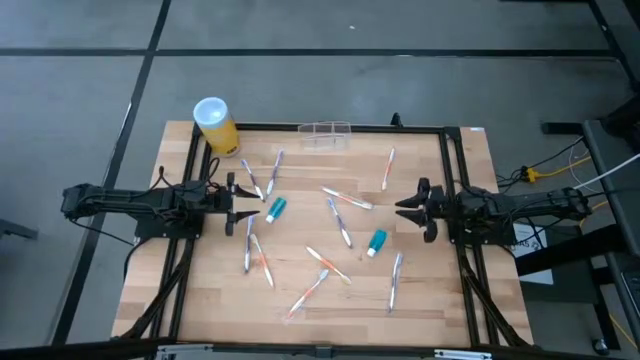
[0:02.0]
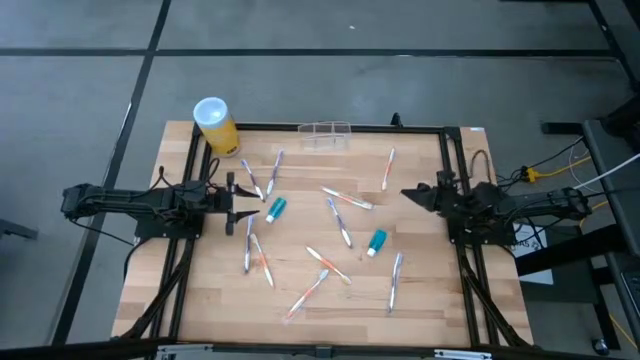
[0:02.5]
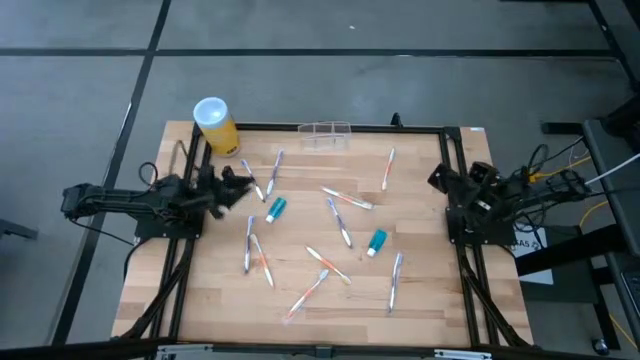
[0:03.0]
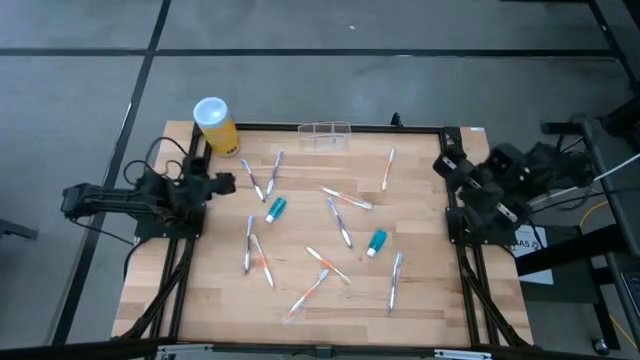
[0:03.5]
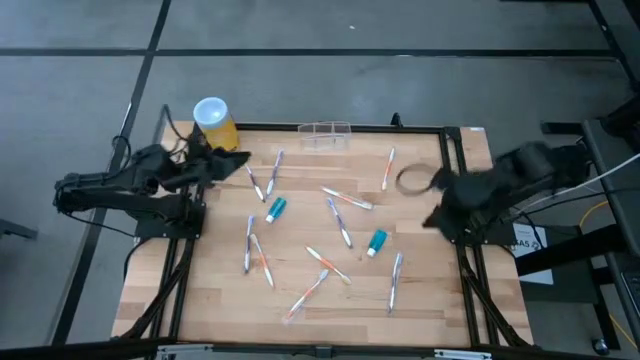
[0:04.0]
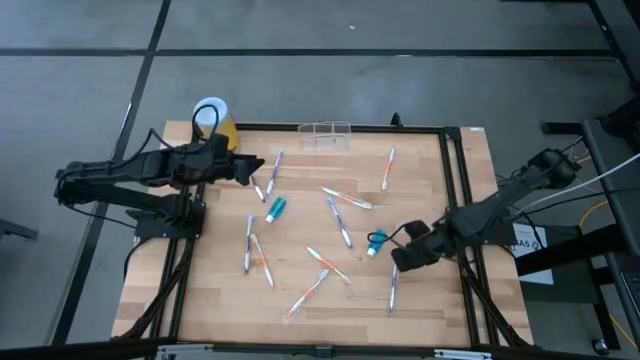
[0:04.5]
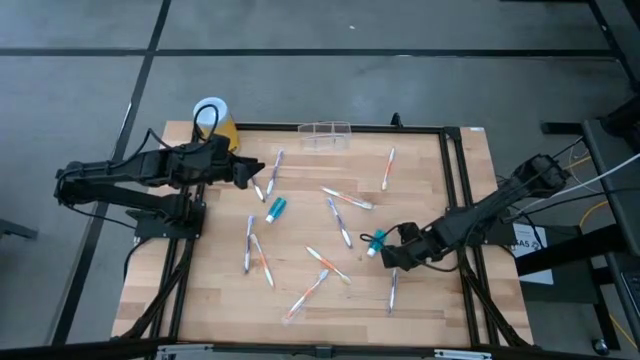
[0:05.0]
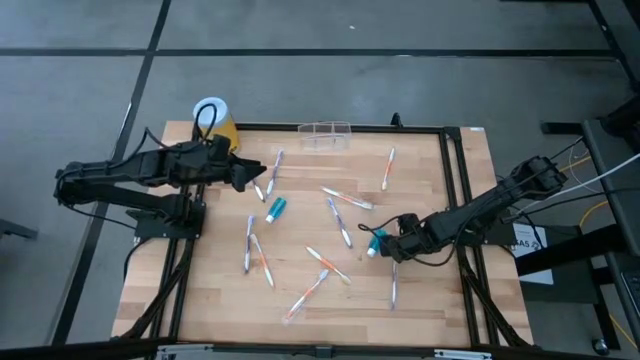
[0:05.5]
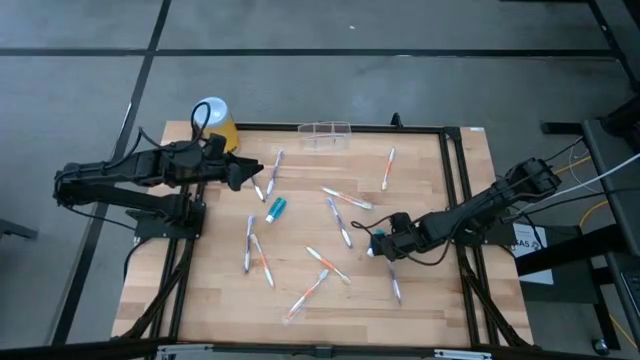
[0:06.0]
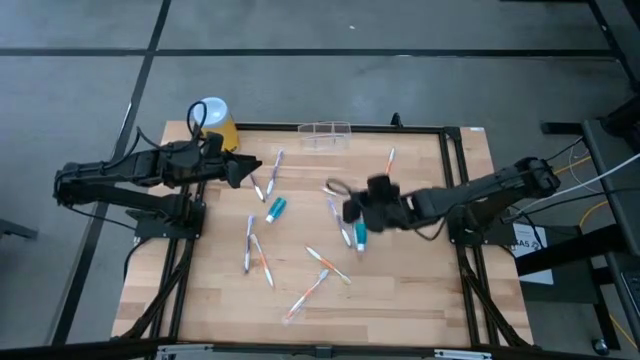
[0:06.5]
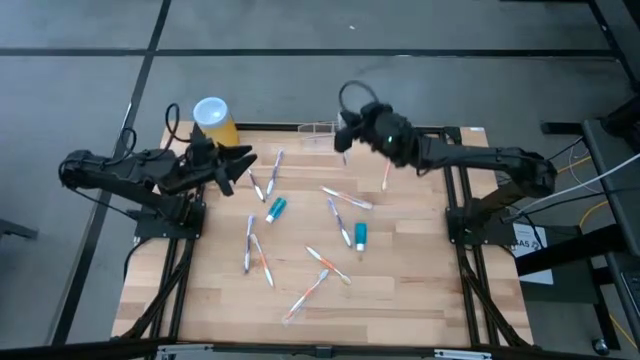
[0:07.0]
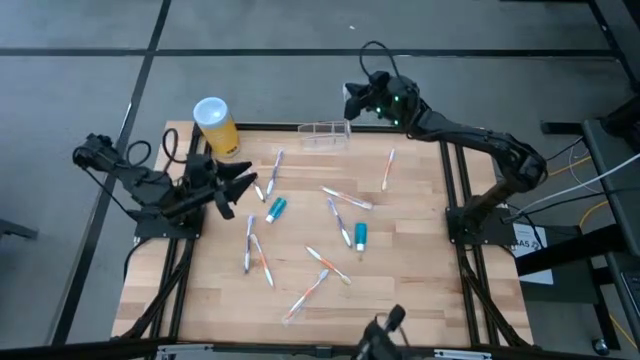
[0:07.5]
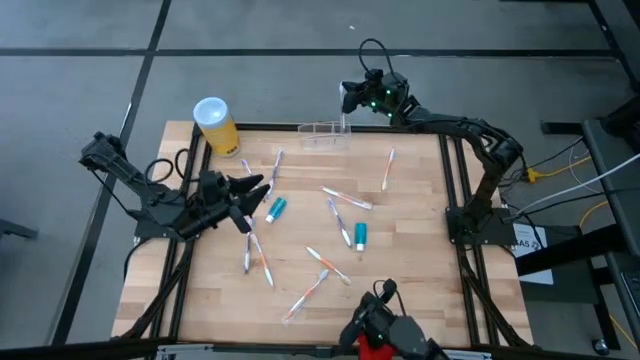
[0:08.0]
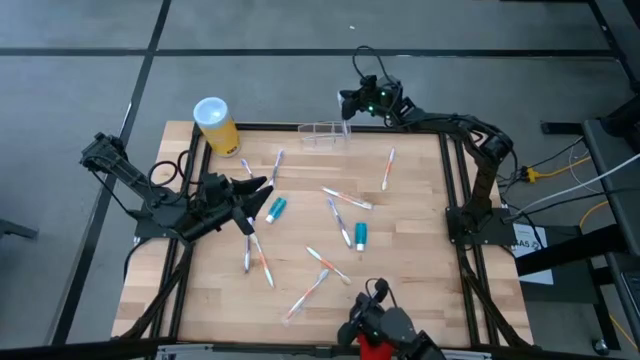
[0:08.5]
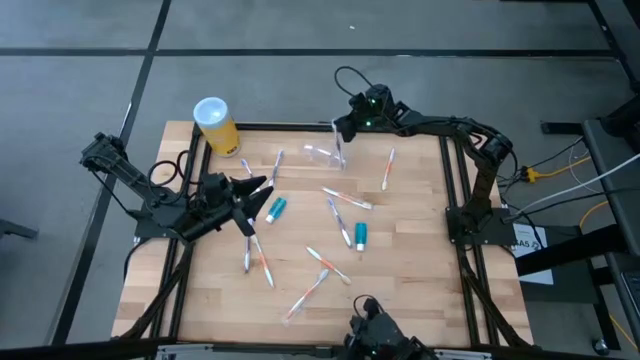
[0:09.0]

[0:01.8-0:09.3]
Task: Pick & Place toothbrushing station
Put the purple toothbrush into the right section of the transparent organizer

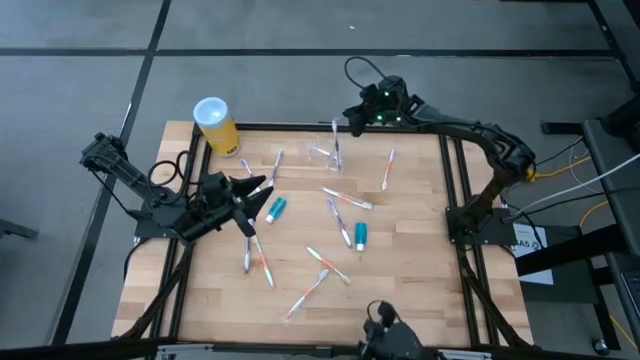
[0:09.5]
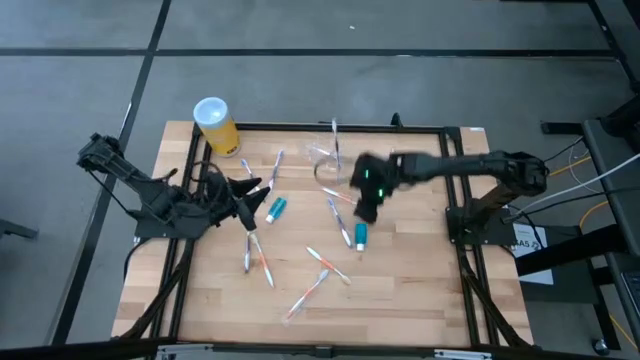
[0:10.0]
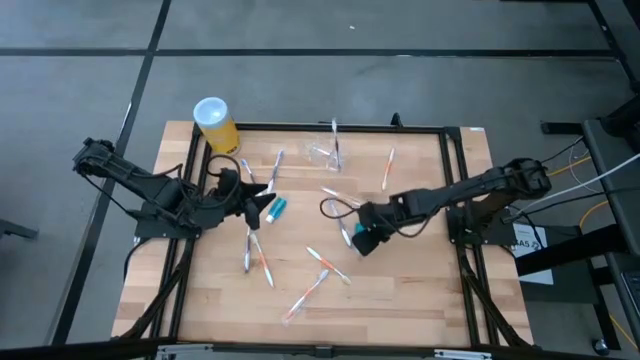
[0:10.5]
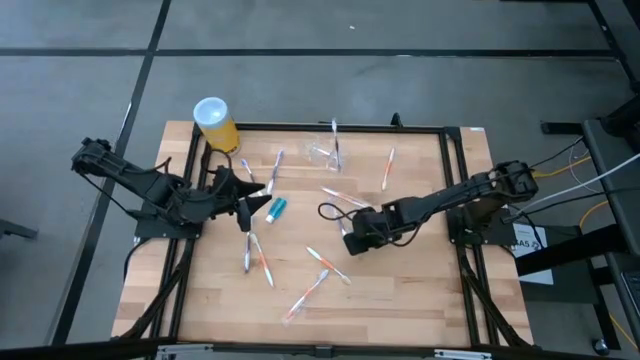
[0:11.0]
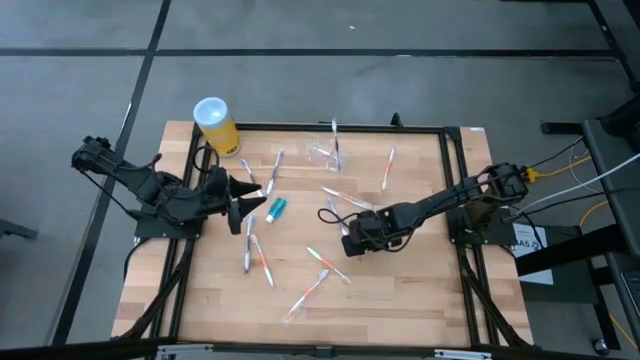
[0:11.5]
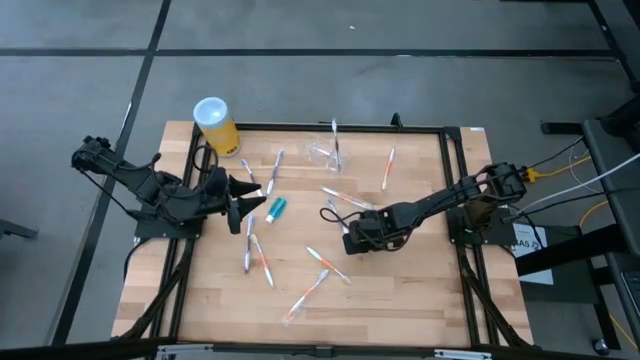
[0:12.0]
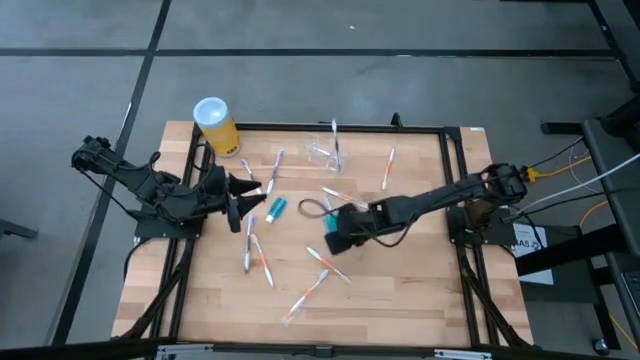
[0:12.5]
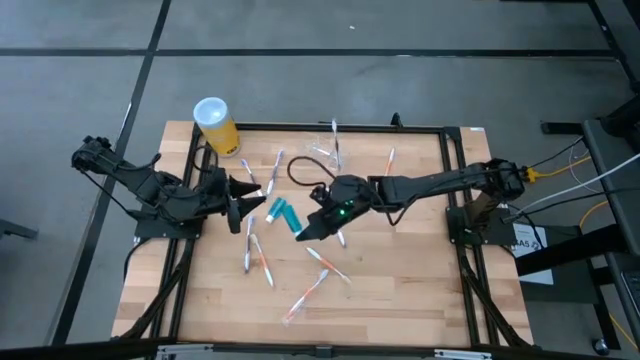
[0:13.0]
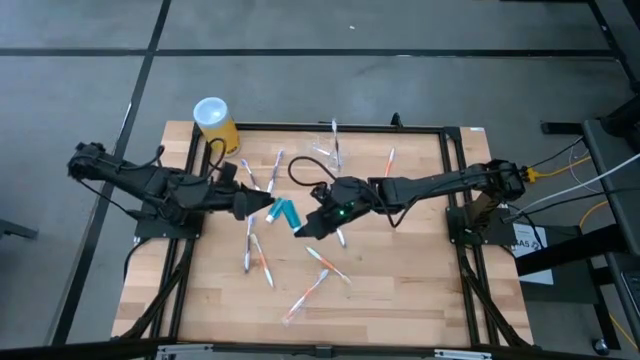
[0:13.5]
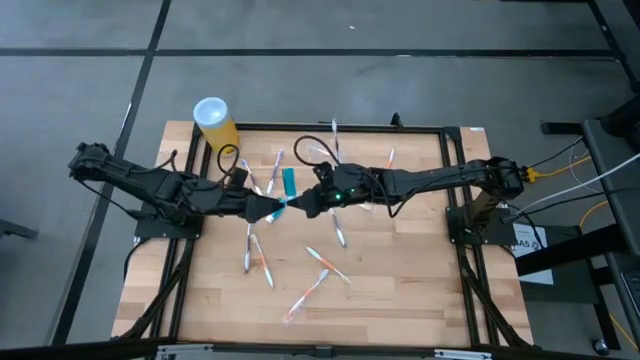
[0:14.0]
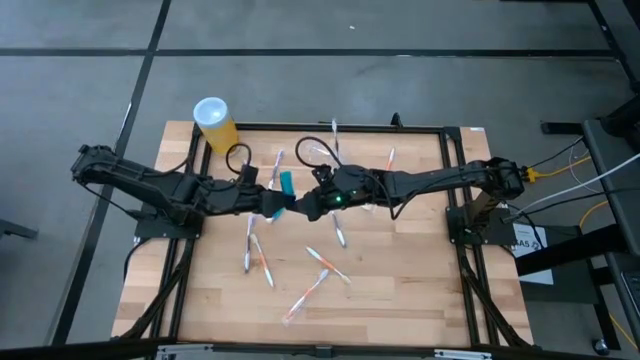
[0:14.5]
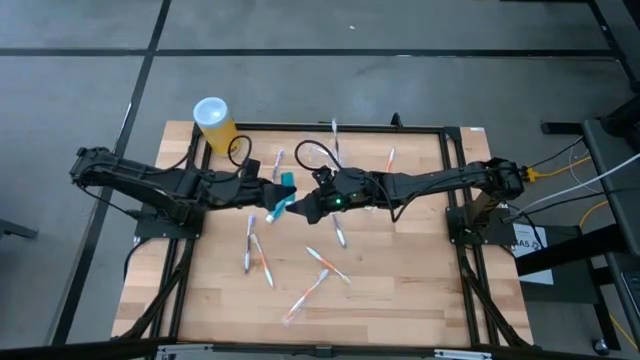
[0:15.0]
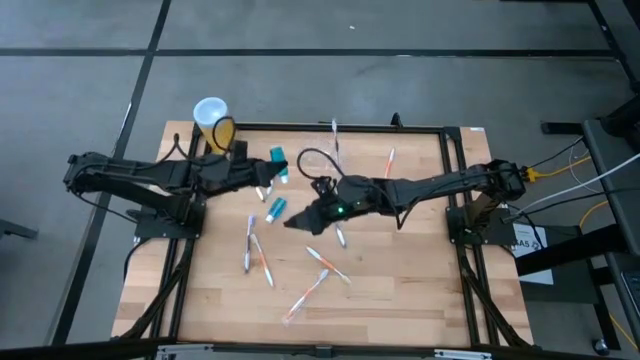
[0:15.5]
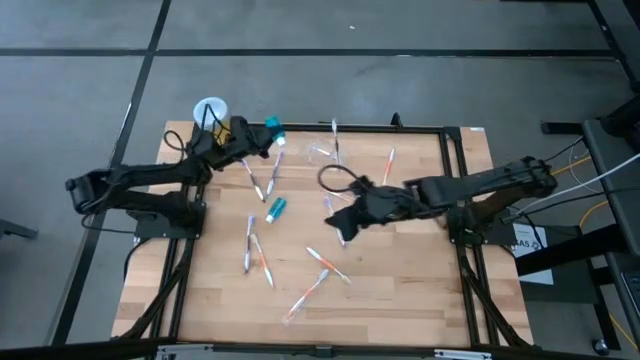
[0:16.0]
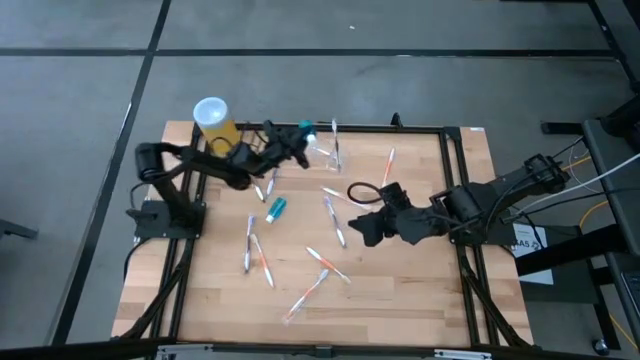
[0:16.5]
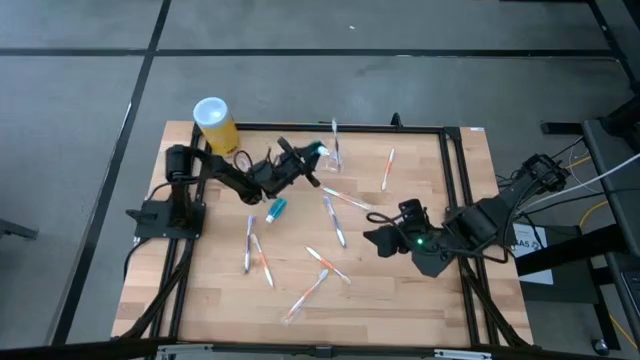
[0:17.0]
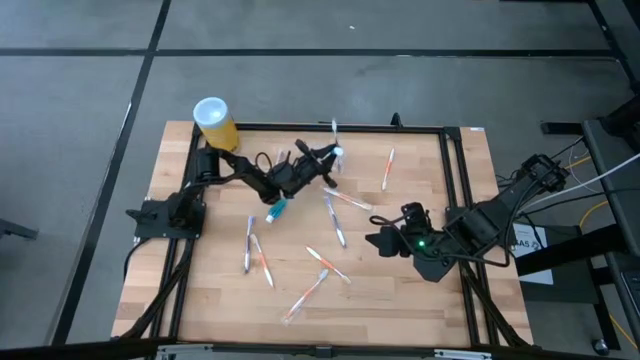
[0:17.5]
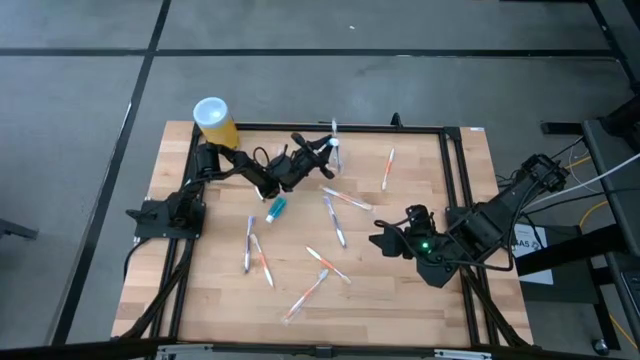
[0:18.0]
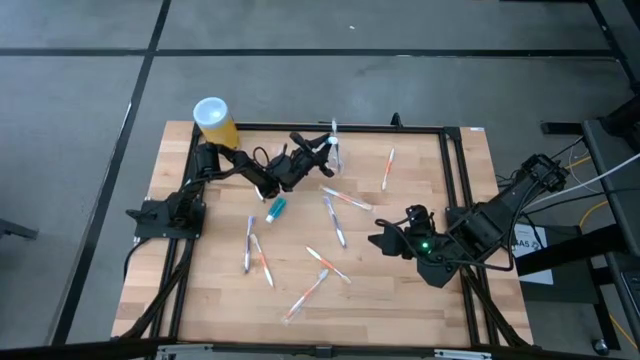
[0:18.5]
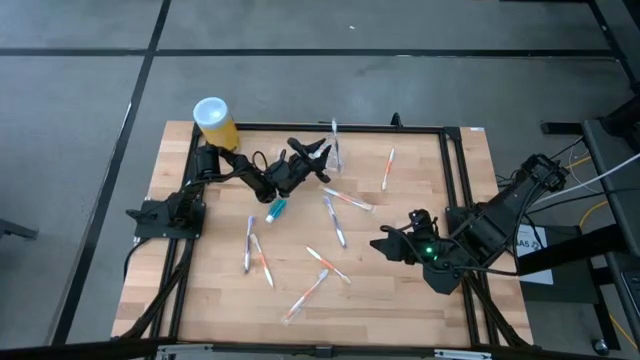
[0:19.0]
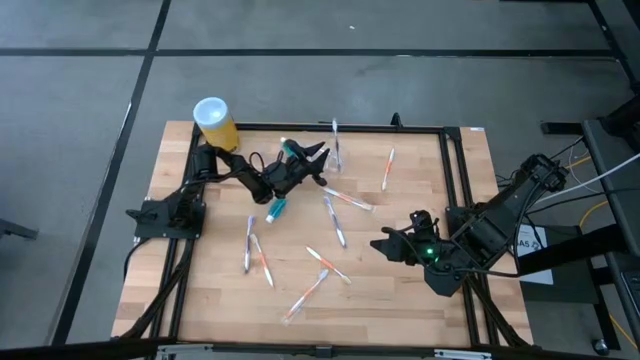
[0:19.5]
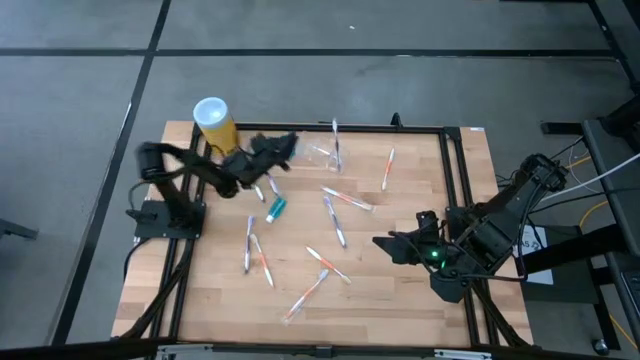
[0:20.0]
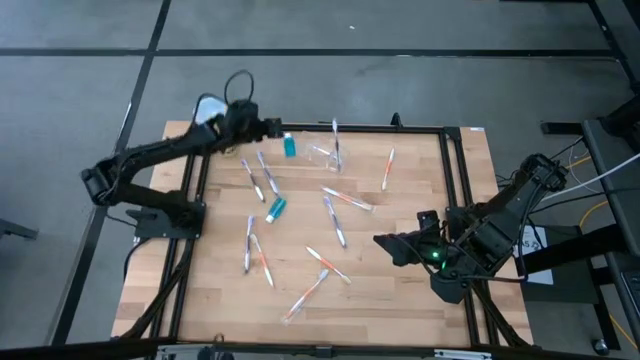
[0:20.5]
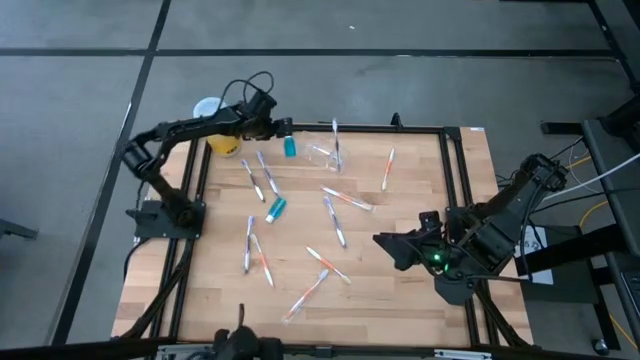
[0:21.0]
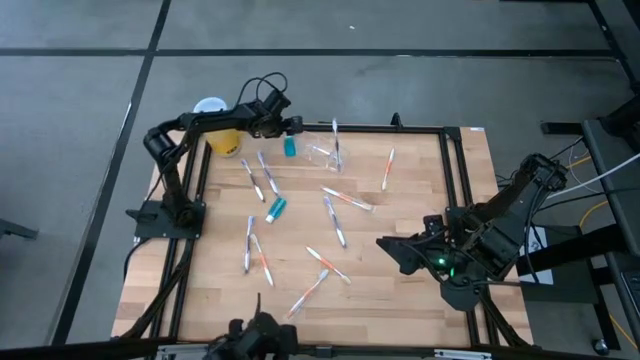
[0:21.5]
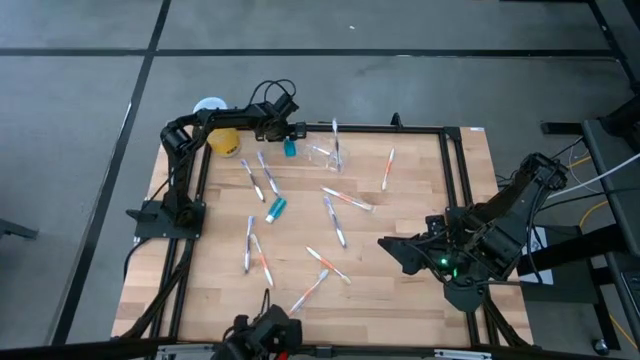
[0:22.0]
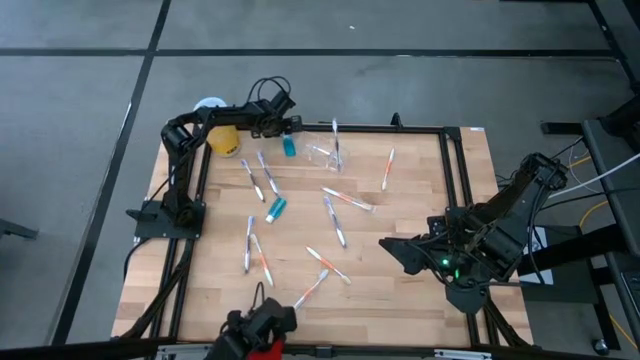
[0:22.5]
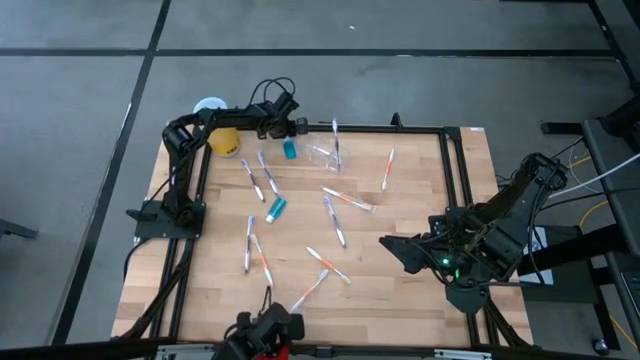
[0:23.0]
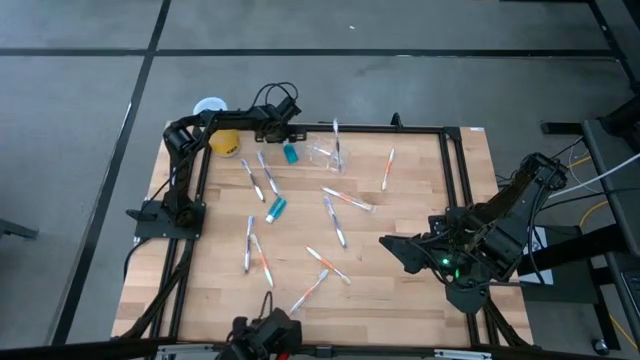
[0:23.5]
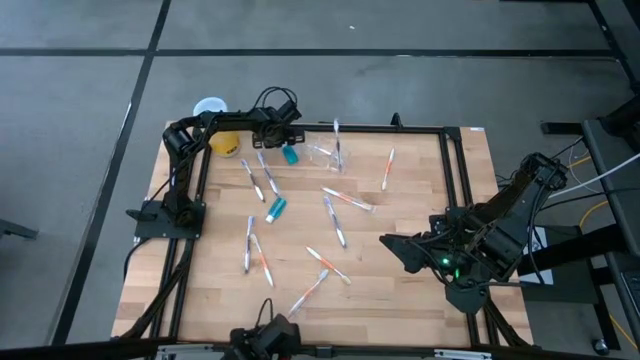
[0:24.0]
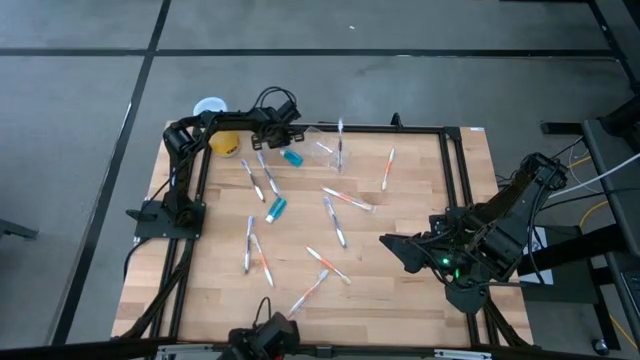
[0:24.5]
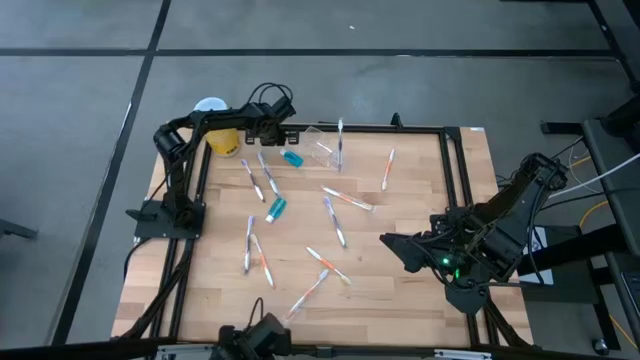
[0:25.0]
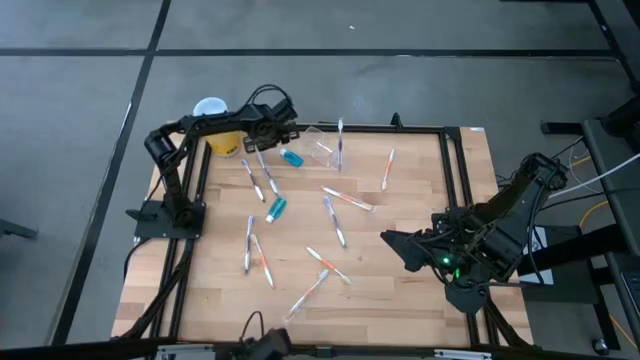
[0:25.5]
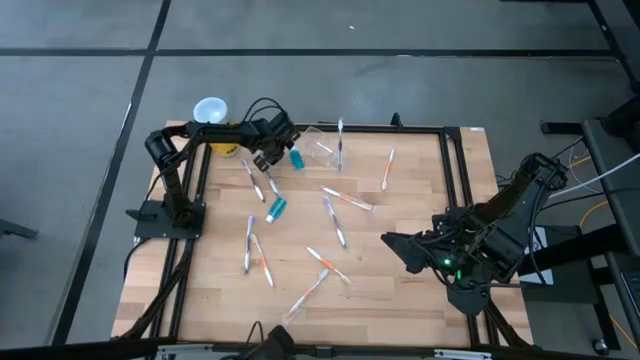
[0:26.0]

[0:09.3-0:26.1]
Put the blue mouthwash into the middle section of the transparent organizer
